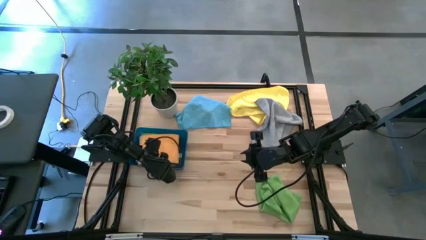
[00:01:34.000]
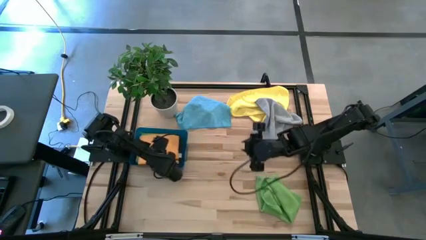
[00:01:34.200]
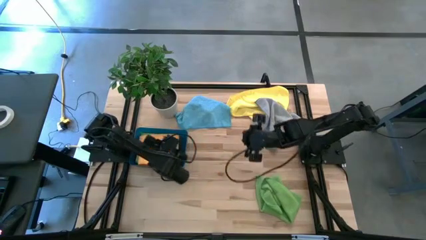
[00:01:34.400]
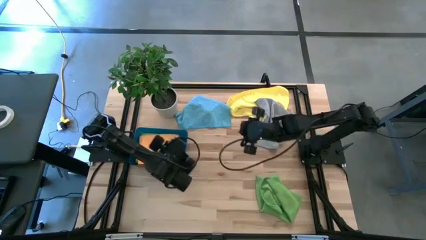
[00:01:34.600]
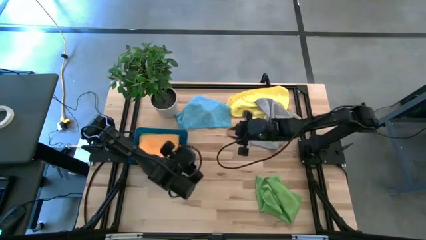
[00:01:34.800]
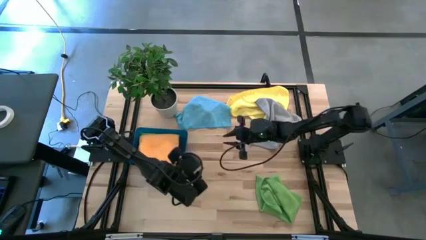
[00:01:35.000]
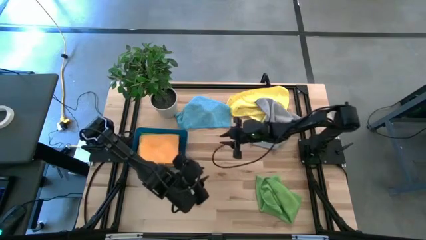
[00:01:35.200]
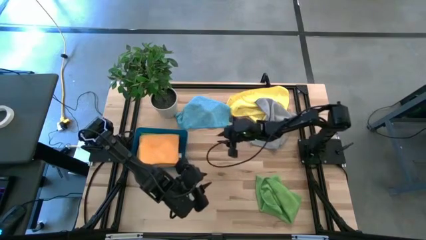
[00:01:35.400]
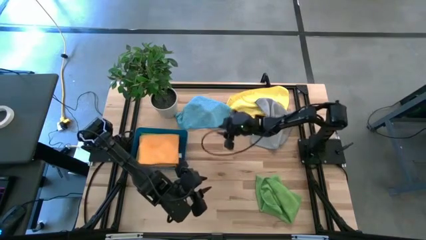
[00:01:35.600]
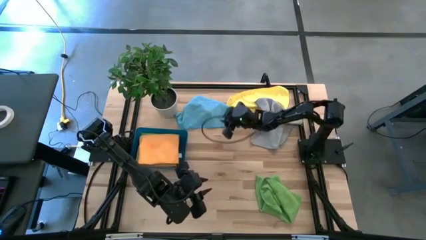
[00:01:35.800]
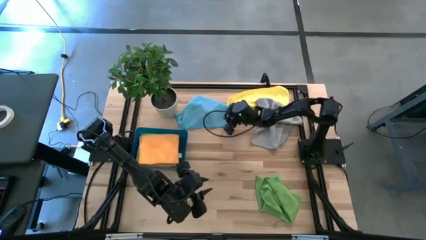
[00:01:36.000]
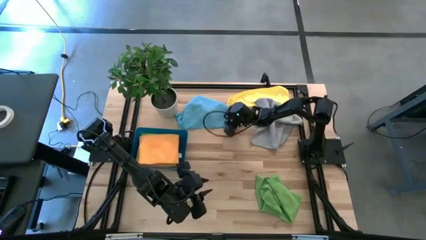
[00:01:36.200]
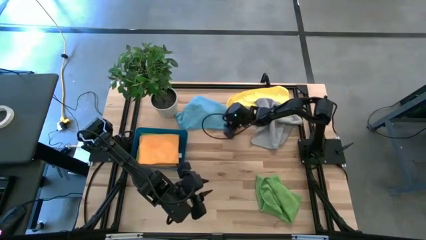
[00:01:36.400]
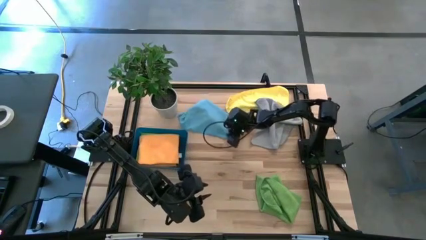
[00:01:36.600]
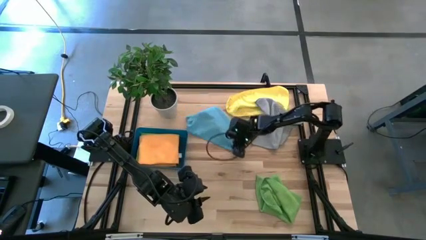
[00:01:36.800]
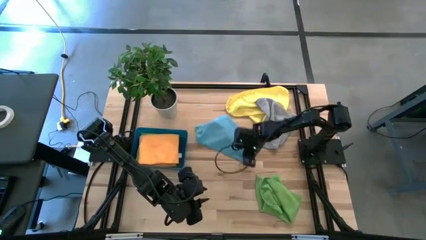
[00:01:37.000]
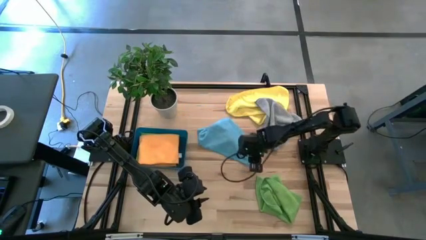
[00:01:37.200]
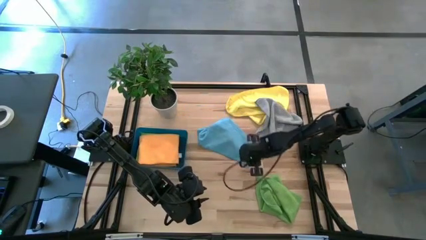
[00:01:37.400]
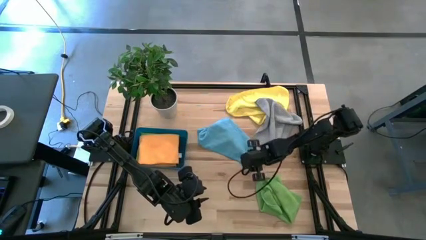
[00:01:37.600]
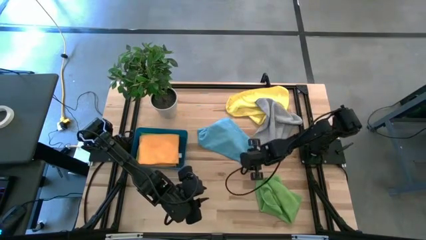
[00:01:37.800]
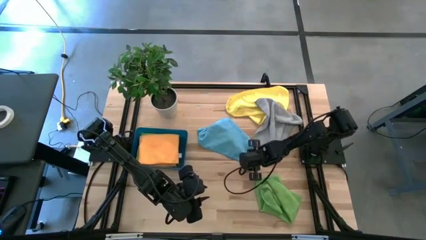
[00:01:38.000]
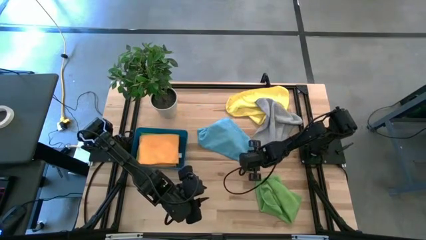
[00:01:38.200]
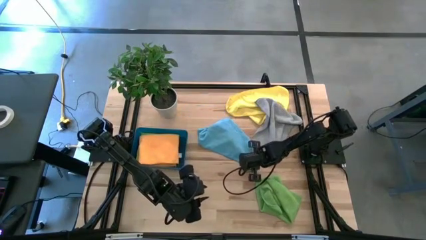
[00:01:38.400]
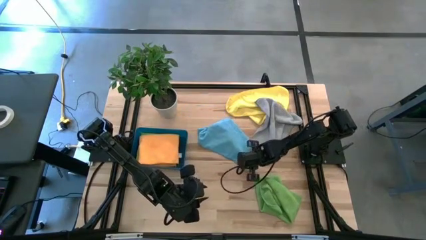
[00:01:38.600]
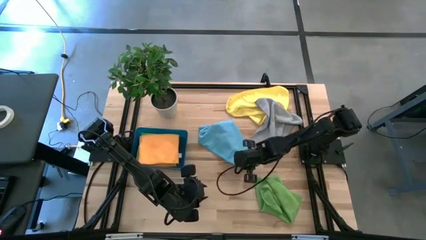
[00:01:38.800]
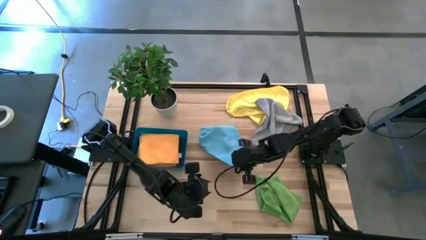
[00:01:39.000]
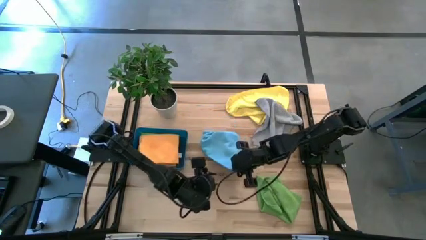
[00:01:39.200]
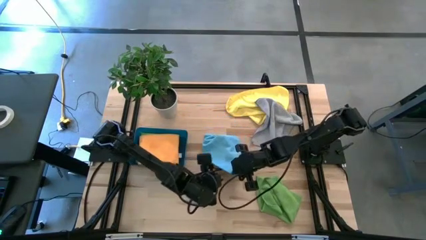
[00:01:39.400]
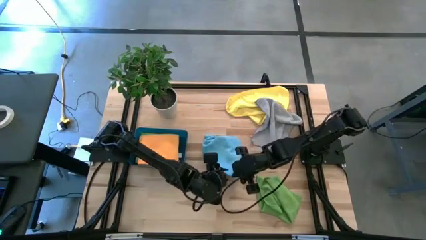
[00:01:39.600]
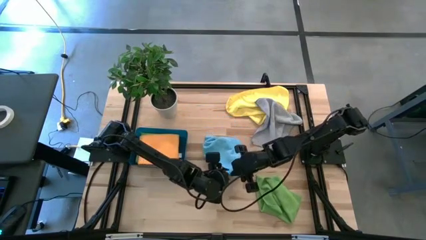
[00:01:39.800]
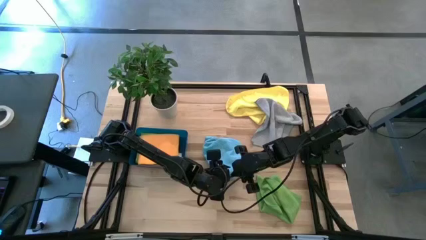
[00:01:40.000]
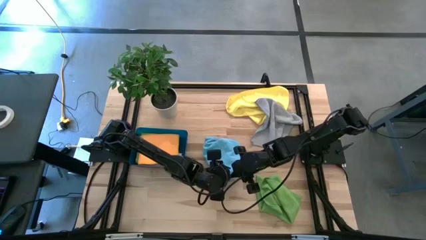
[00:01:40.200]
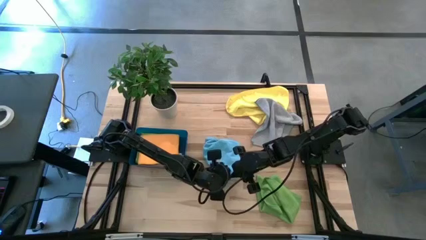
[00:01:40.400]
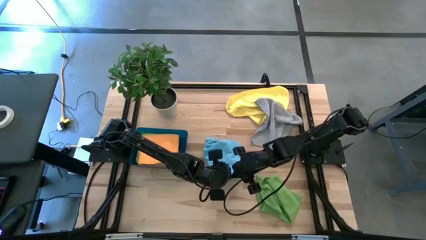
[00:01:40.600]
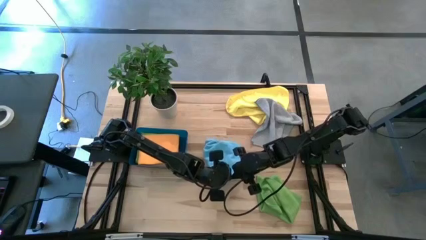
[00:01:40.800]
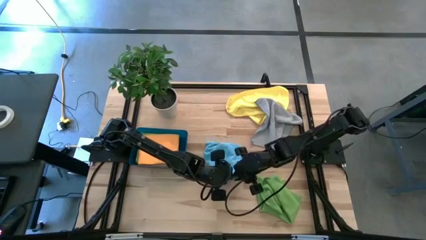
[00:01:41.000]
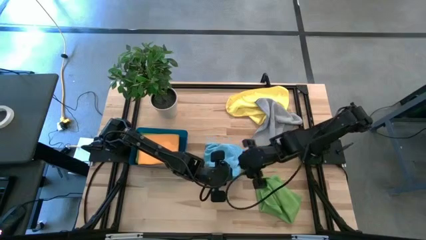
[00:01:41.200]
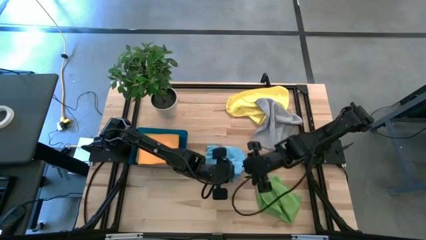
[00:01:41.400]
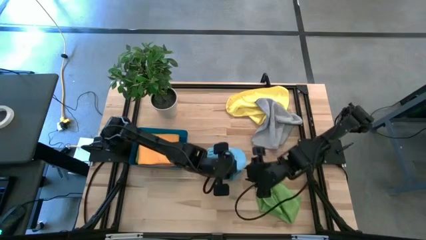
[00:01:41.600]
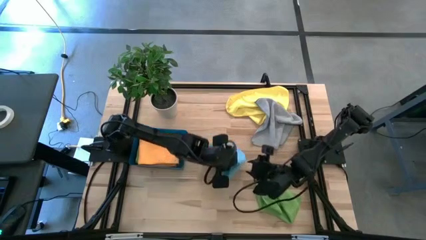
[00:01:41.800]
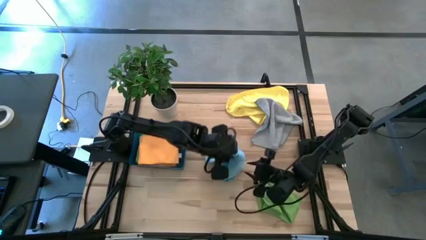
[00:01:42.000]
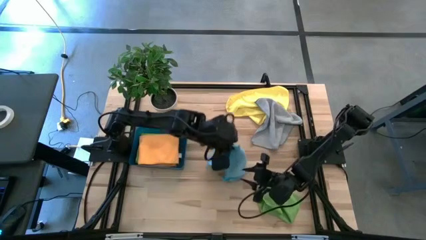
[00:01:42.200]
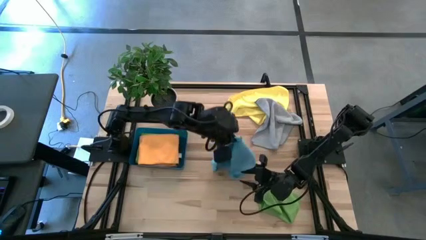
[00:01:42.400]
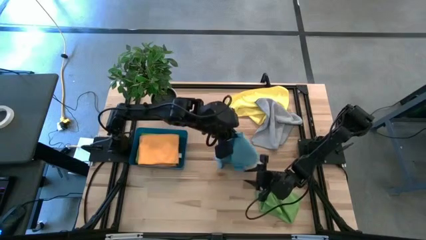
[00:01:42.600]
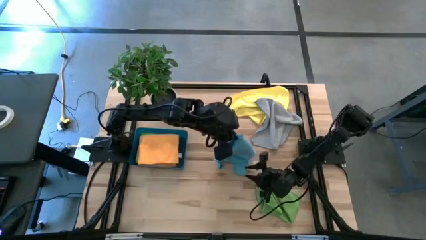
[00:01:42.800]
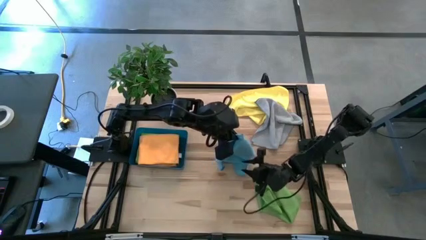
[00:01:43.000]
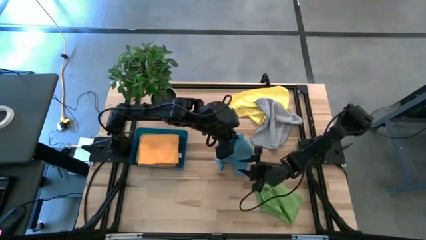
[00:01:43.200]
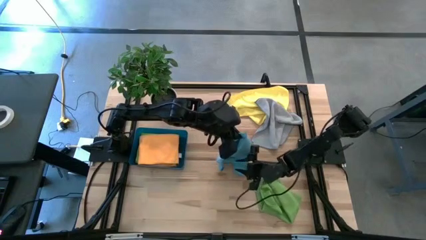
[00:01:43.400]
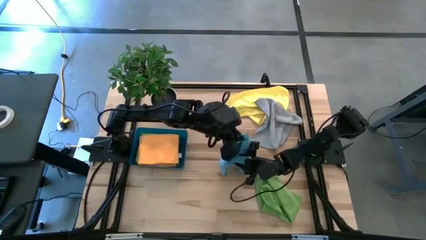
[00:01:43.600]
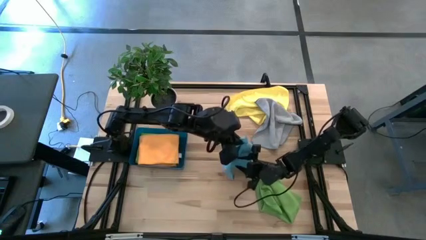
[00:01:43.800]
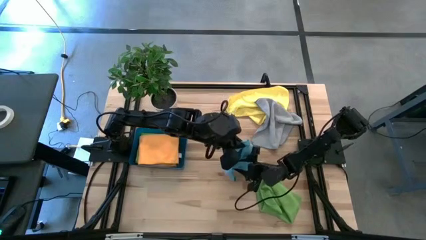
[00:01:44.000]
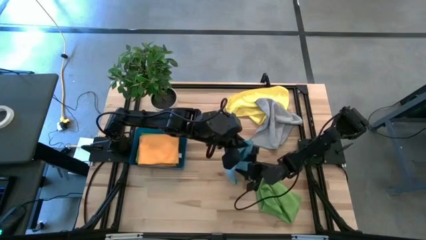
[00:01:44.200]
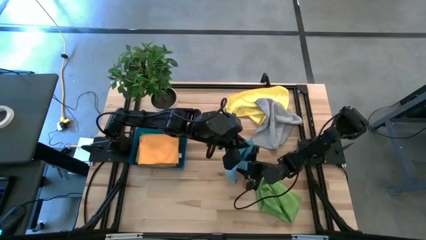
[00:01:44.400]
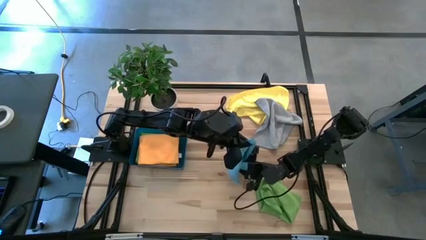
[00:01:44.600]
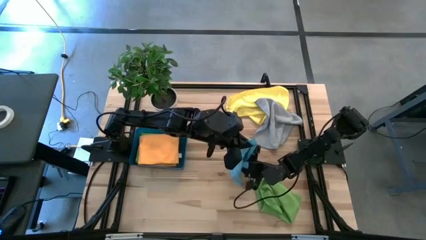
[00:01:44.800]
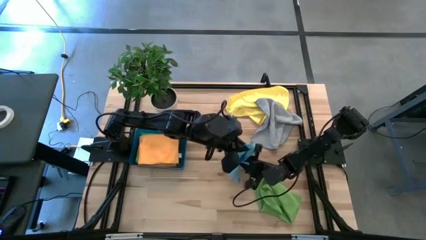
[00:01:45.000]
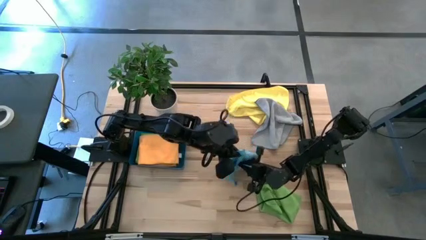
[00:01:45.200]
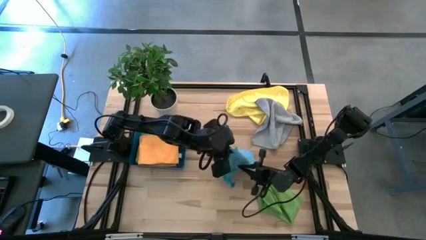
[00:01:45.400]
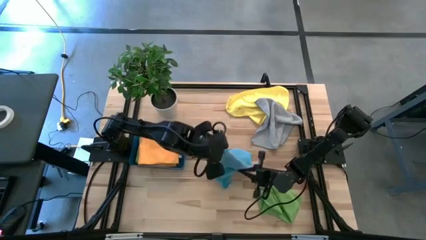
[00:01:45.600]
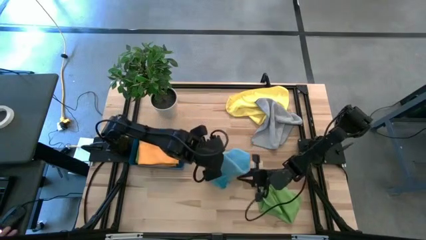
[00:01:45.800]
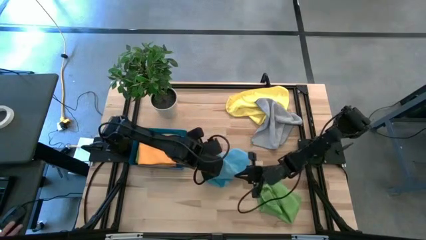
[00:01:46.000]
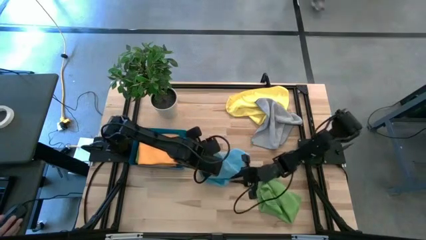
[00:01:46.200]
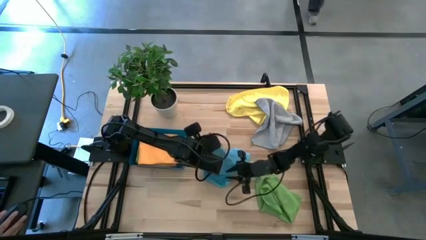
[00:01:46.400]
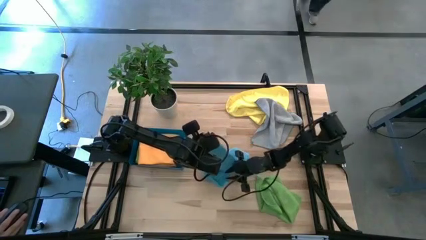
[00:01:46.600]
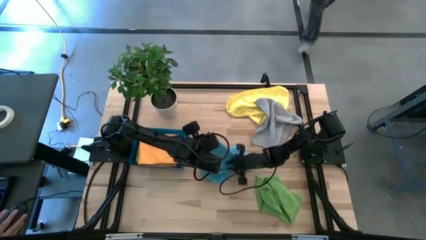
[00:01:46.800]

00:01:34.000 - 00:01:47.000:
Task: Fold microfiber towels
Fold the blue microfiber towel on the table

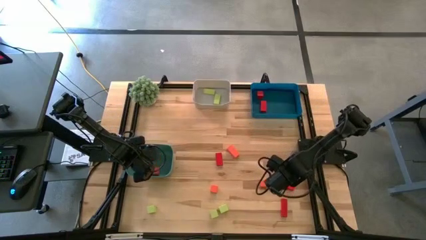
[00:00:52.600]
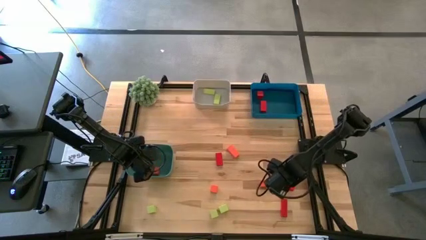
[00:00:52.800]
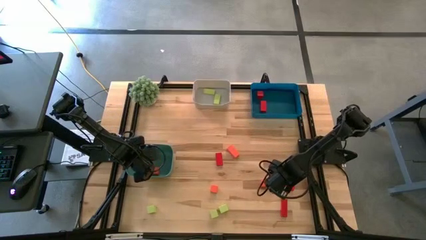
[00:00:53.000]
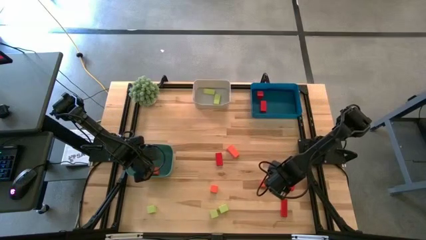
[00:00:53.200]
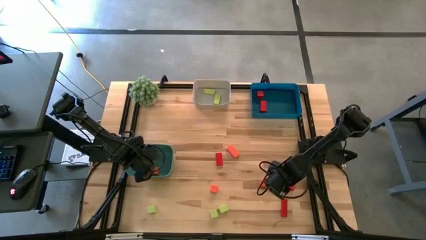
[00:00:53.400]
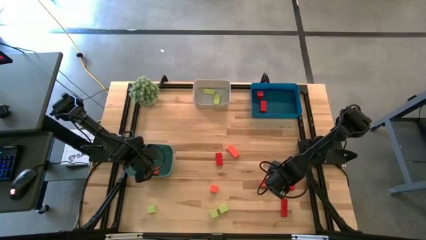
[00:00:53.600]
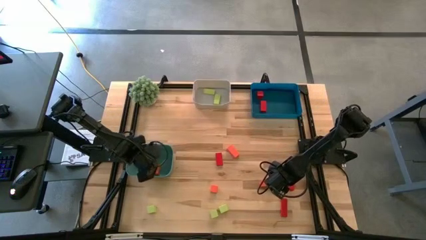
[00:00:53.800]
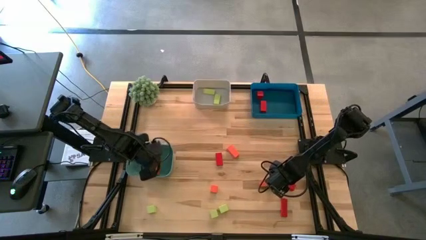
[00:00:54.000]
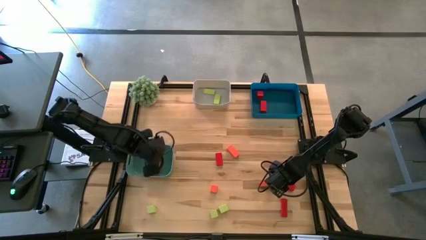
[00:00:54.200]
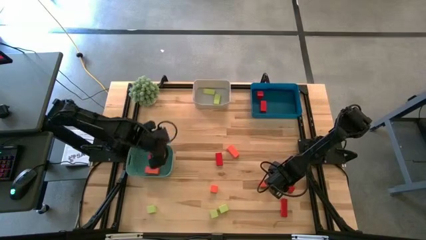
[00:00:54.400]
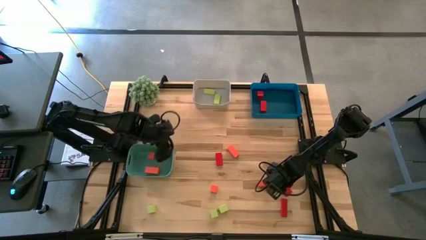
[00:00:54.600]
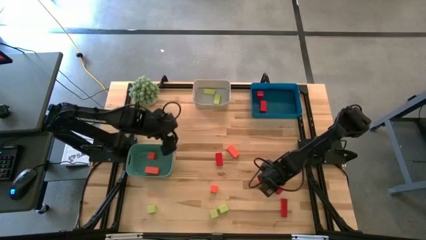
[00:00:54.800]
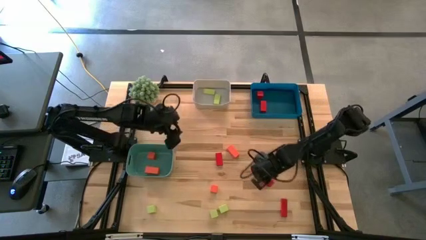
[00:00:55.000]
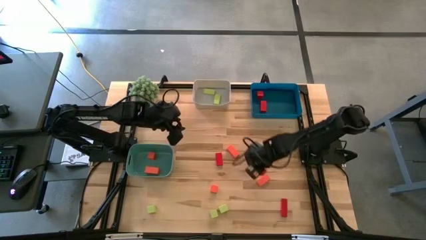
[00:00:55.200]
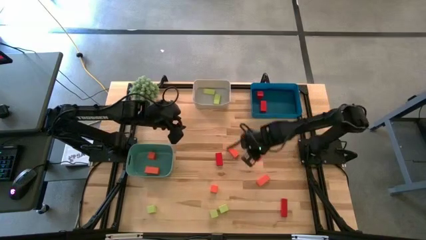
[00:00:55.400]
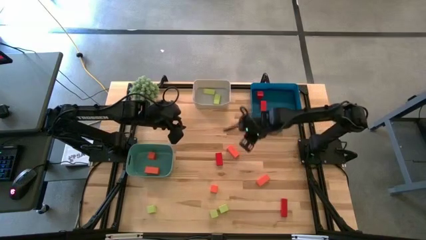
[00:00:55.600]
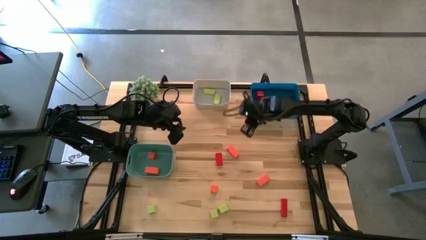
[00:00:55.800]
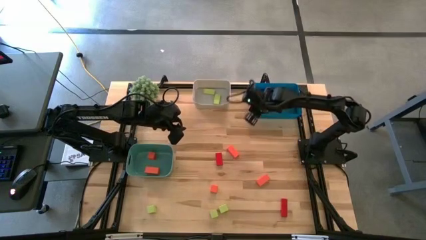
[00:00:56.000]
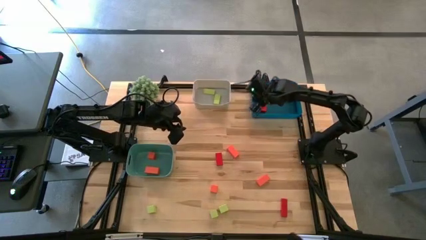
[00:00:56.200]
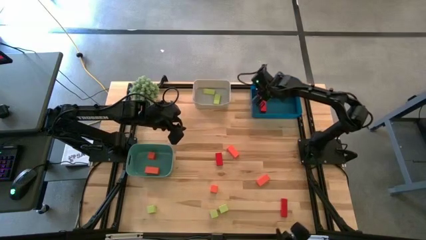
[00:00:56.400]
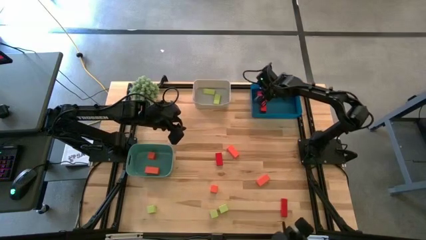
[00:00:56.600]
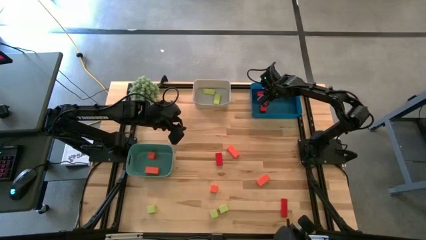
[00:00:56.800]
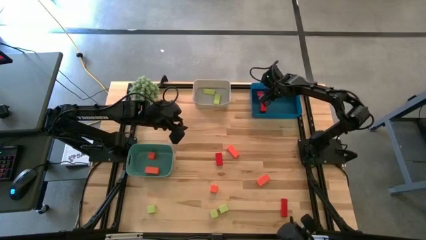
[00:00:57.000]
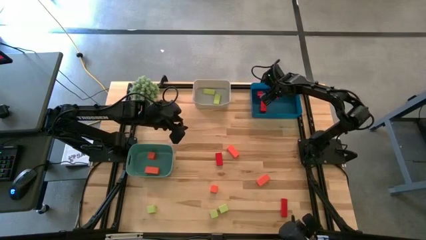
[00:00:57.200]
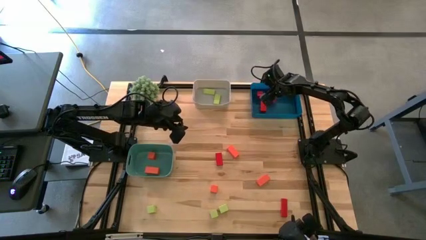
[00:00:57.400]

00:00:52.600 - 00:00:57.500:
Task: Sort & place blocks by color
Put the red block into the blue bin
